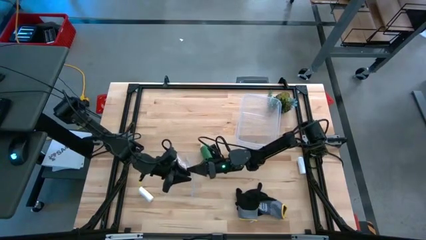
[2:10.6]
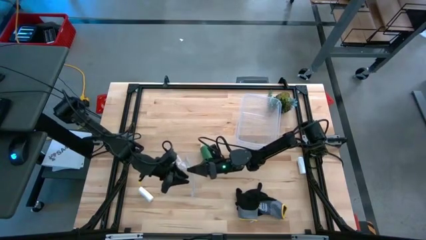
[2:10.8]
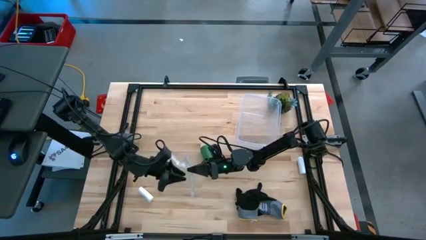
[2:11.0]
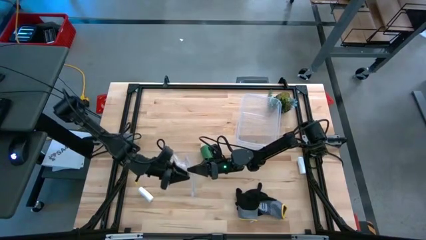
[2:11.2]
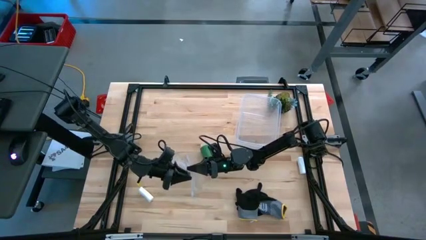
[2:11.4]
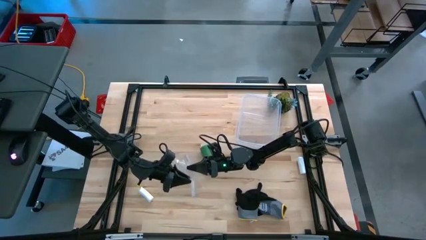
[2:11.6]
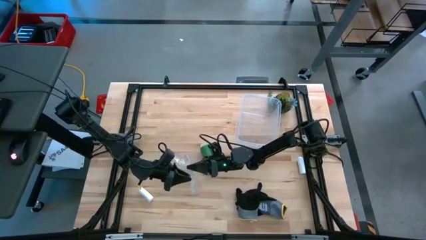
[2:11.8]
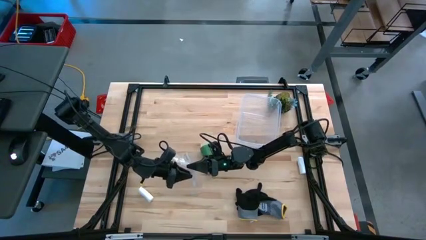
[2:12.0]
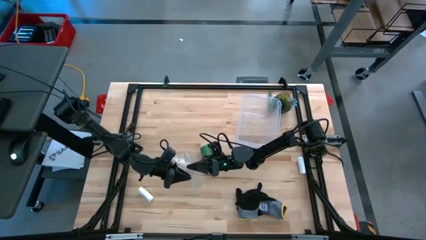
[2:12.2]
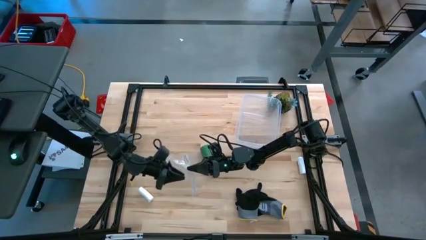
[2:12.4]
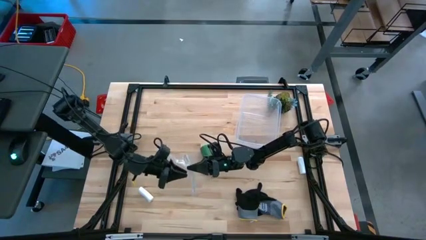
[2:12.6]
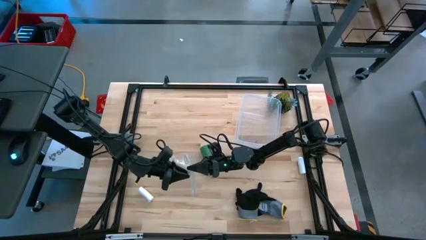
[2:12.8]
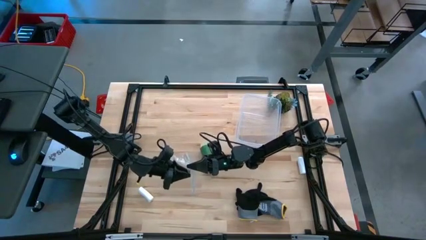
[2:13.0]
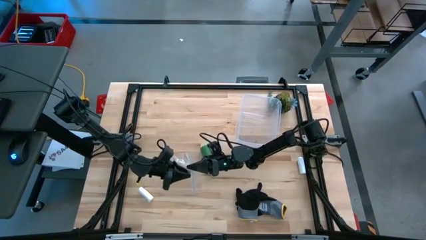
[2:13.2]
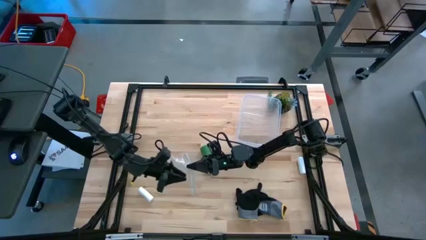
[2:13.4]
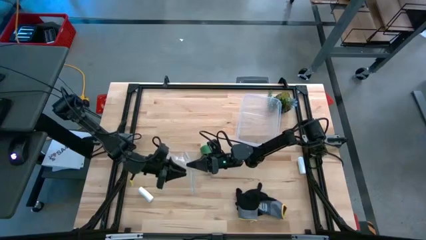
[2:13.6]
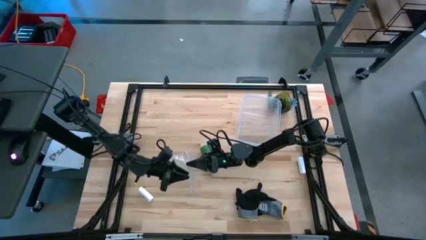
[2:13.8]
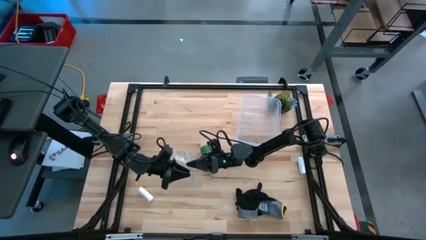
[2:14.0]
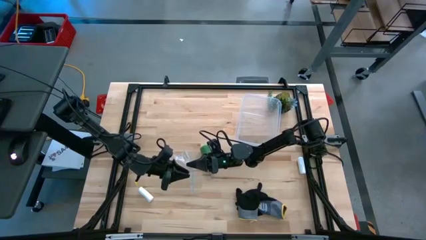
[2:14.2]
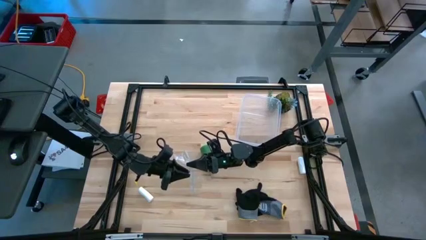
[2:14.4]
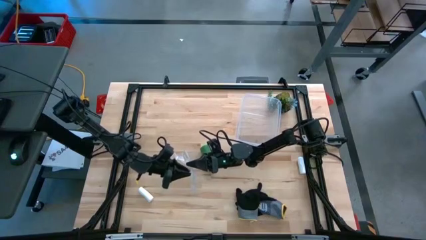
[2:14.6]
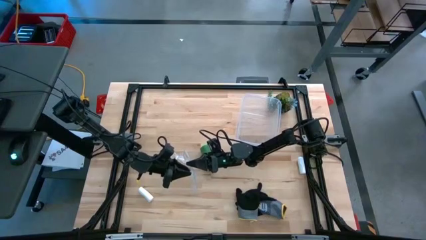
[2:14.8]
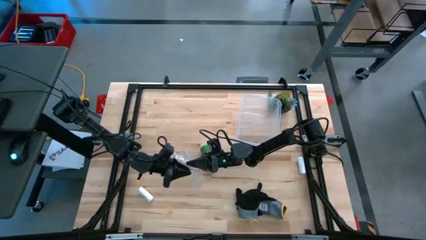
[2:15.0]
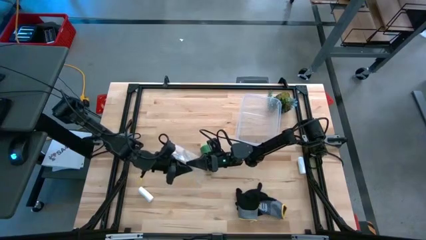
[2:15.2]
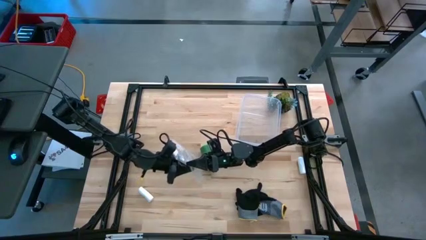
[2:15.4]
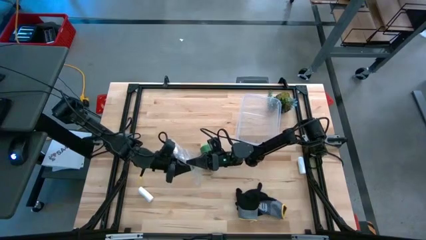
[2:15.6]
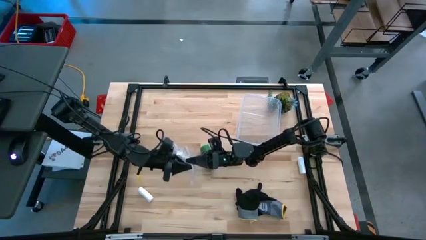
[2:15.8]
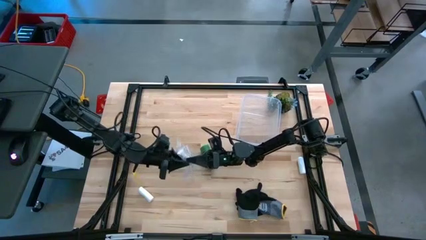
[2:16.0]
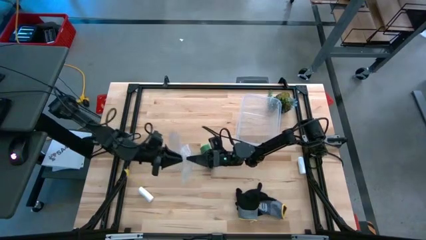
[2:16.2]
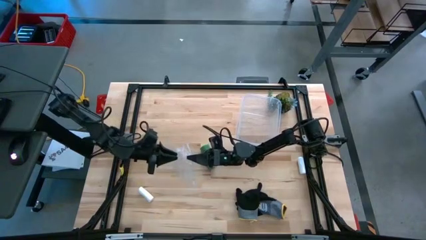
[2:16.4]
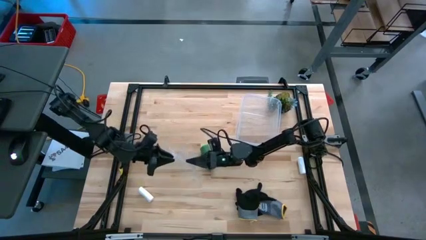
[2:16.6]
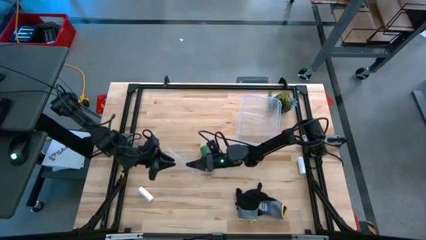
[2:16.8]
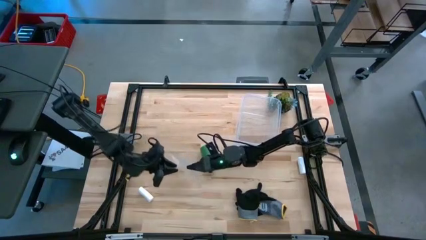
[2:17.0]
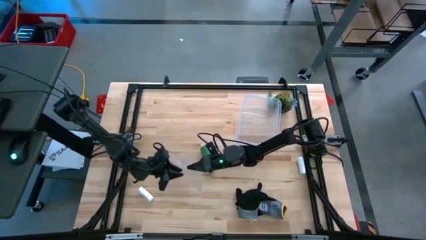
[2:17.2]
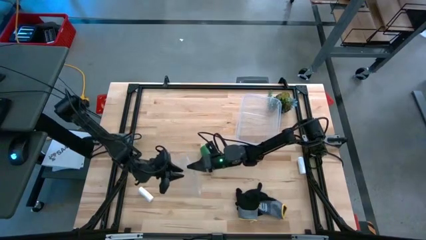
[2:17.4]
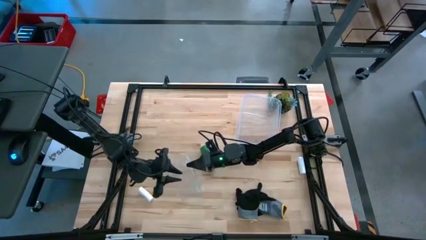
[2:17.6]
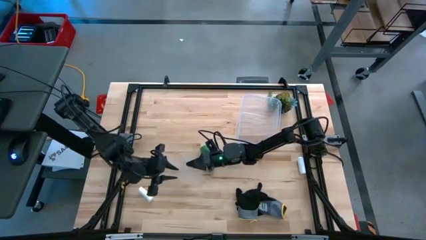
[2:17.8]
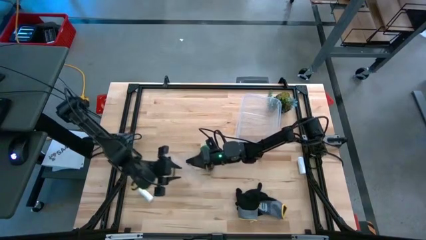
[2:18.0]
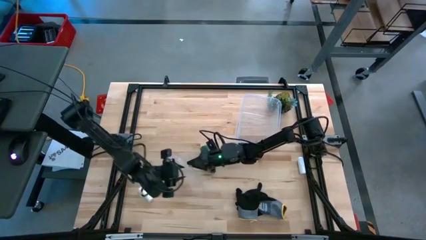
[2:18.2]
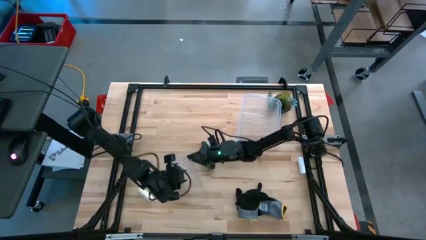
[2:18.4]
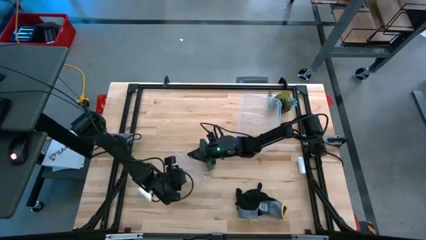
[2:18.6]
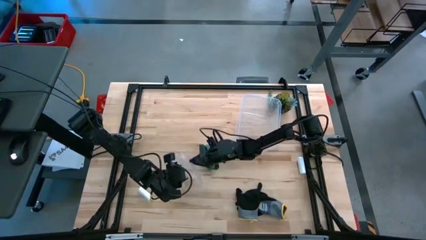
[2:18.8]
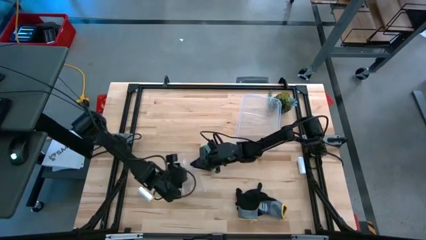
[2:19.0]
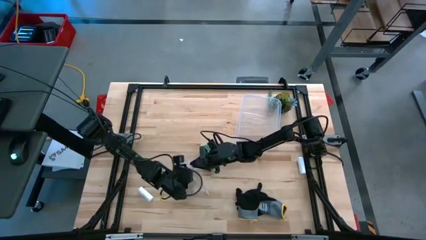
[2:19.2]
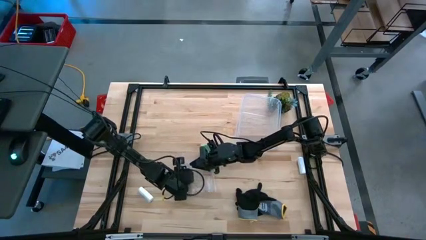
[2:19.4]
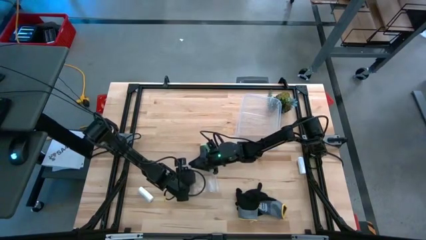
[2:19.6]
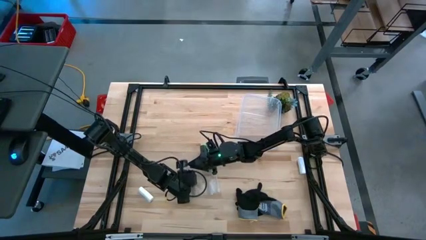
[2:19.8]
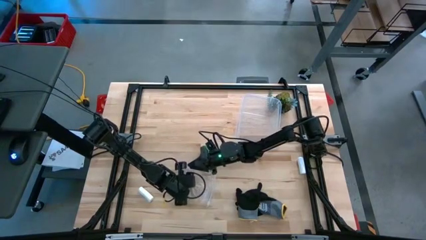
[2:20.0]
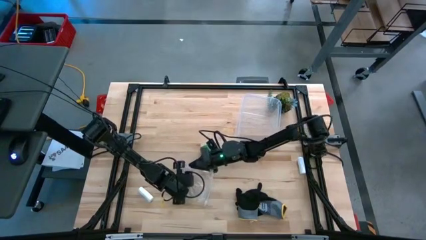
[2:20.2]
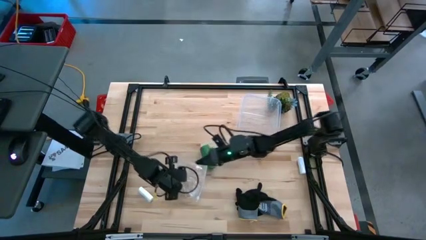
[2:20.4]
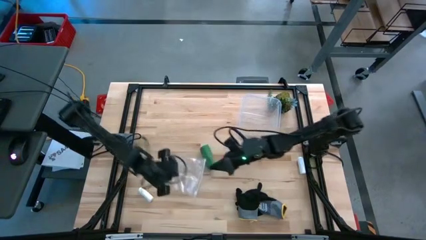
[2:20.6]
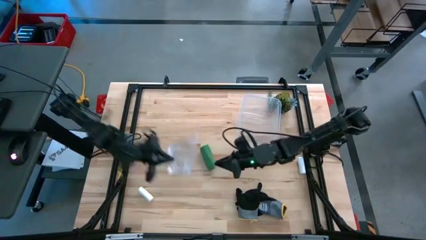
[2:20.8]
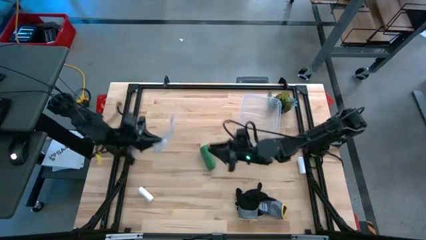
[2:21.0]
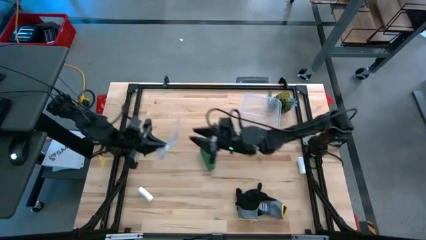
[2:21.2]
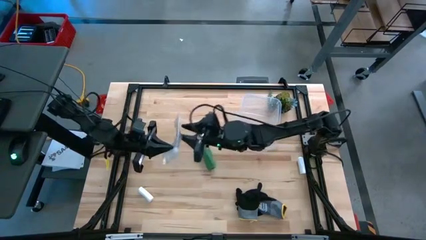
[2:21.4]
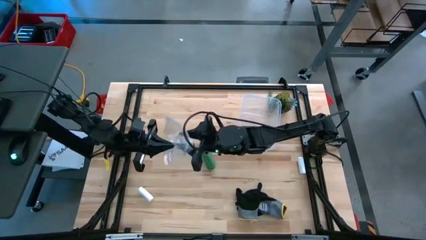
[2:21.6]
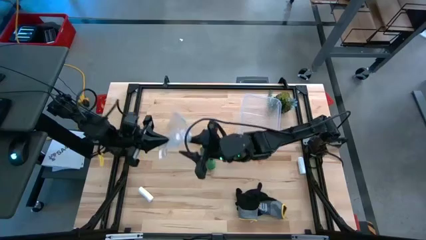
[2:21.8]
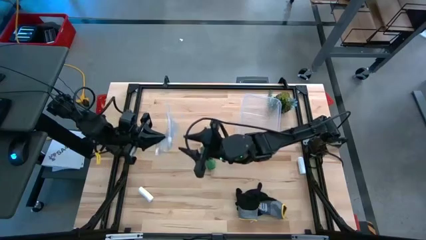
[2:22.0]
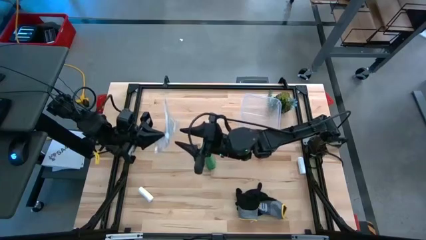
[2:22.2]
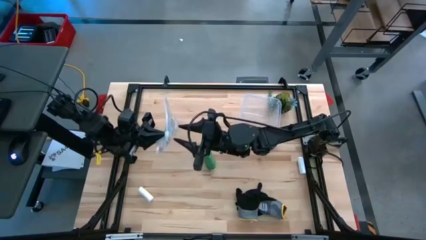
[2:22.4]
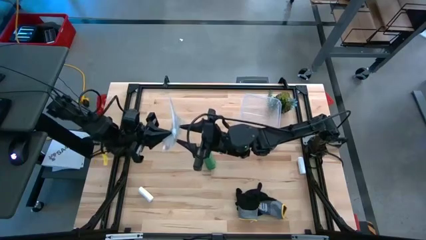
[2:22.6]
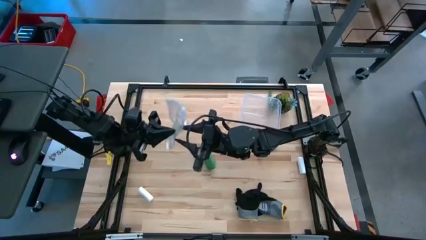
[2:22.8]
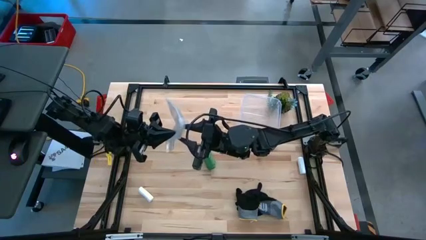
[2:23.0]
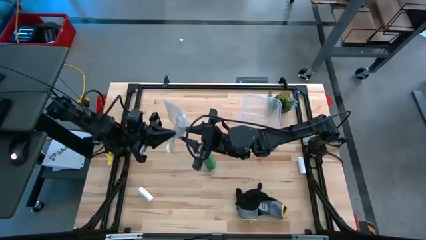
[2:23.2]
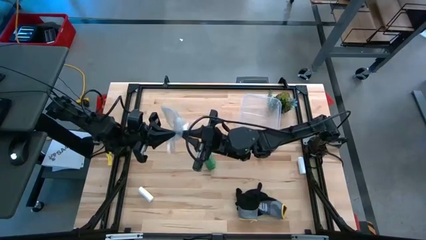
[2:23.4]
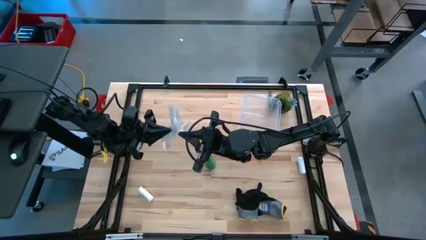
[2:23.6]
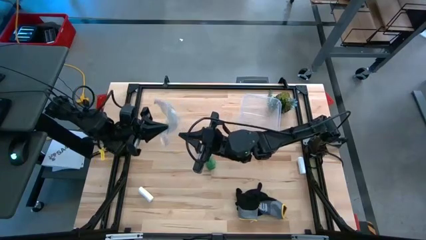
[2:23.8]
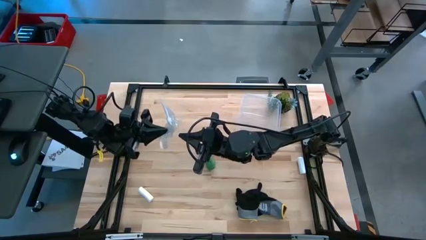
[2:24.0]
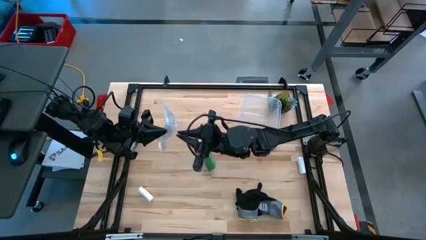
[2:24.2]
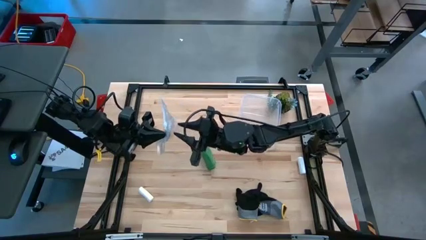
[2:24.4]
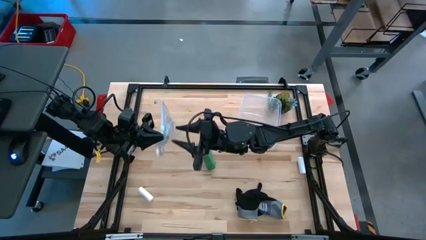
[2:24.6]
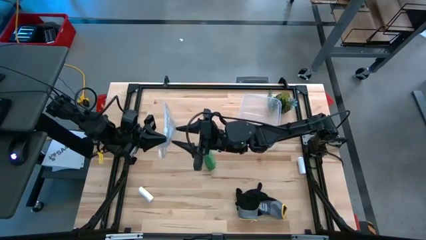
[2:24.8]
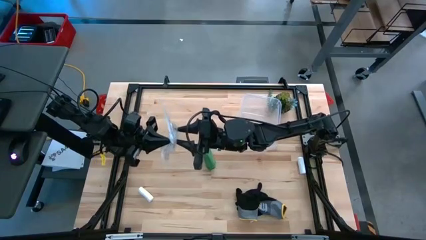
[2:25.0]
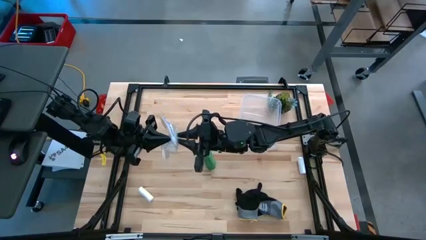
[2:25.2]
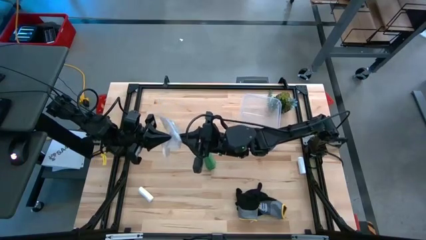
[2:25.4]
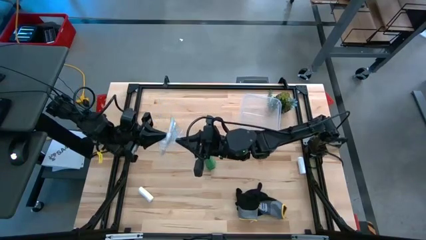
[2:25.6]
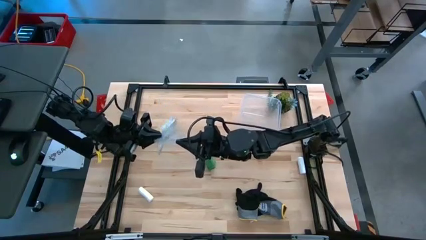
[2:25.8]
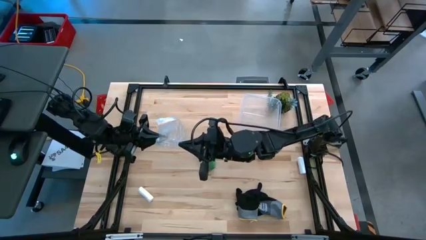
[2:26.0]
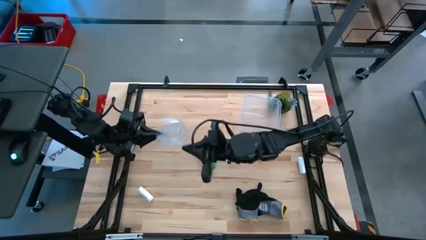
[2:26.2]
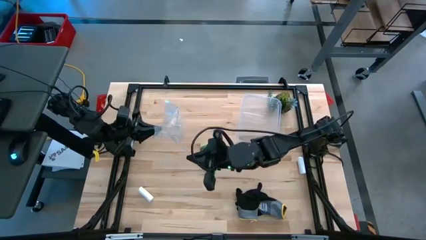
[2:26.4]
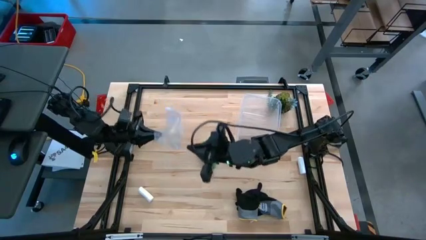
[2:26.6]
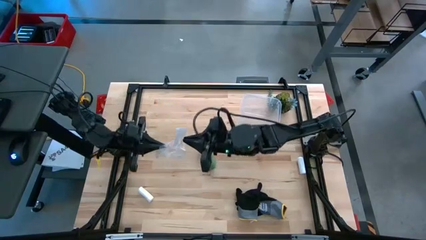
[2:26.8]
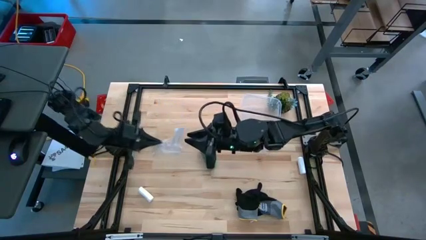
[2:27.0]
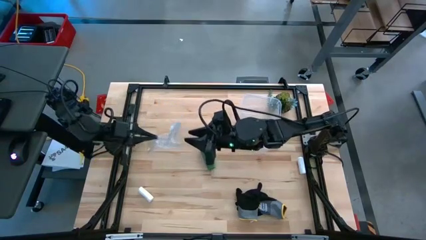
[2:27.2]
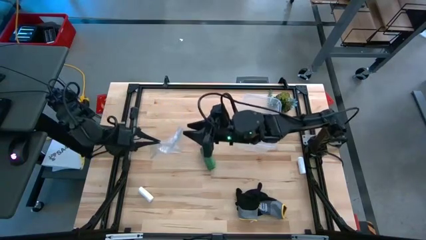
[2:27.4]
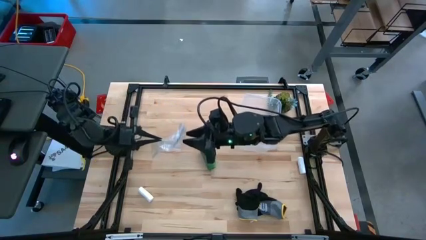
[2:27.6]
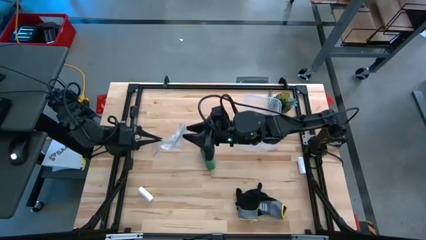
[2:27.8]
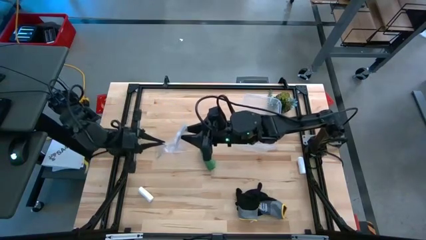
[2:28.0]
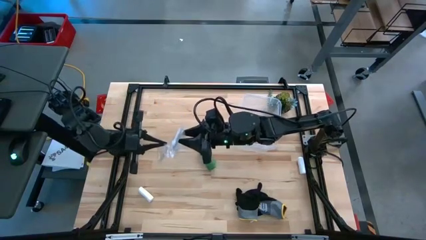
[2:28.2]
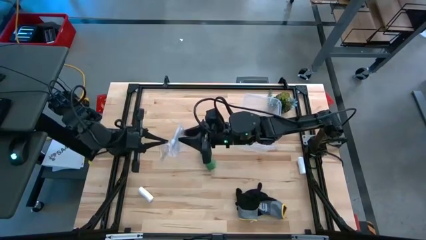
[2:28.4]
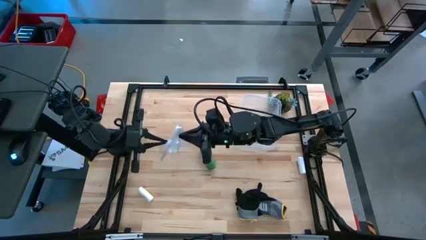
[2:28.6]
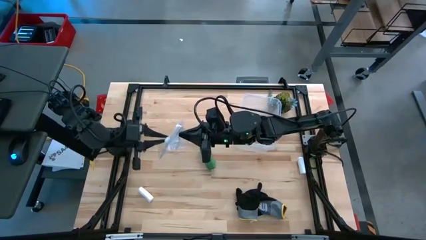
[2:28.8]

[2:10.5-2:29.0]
Task: Roll bandage
Open the transparent zip bag
